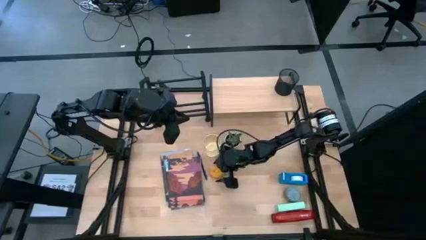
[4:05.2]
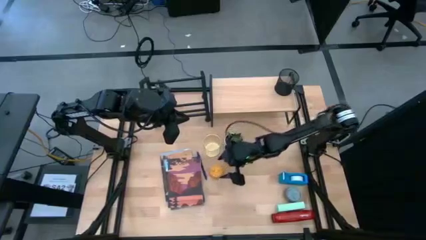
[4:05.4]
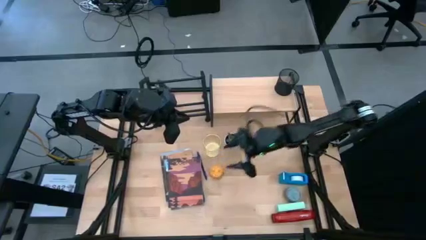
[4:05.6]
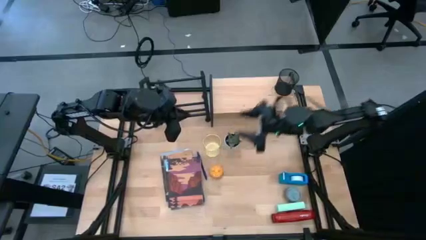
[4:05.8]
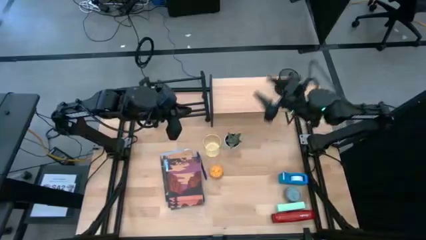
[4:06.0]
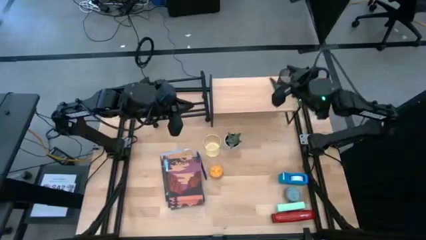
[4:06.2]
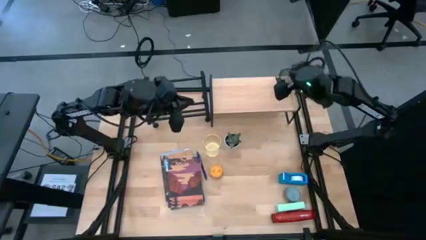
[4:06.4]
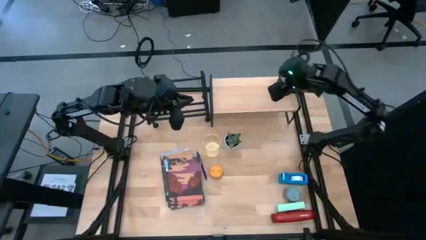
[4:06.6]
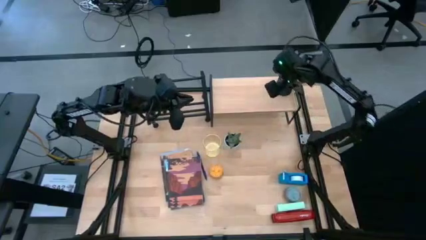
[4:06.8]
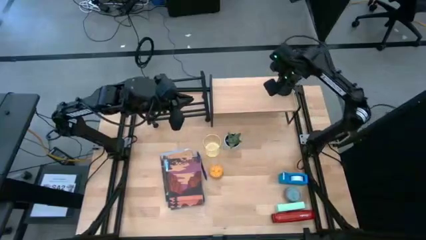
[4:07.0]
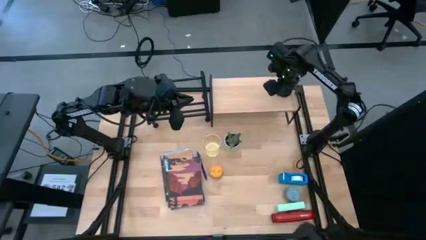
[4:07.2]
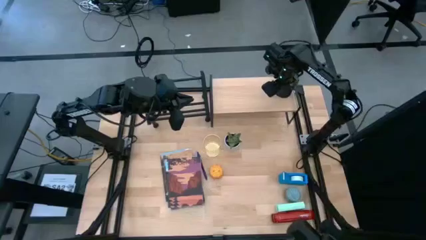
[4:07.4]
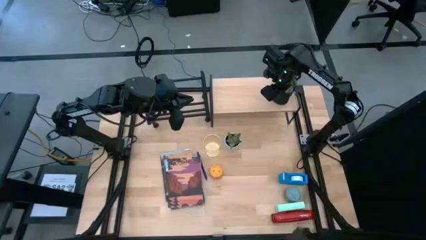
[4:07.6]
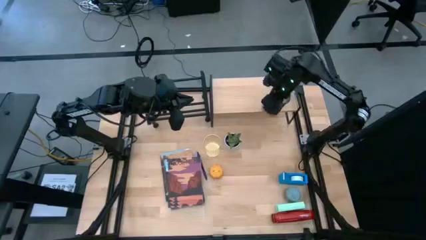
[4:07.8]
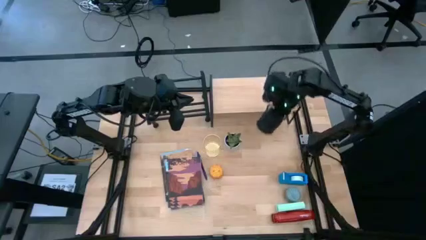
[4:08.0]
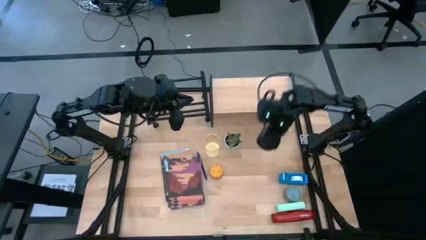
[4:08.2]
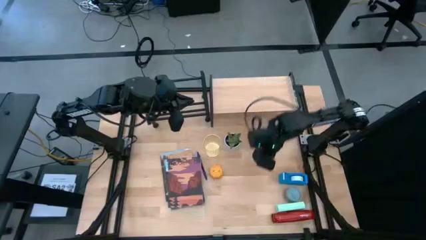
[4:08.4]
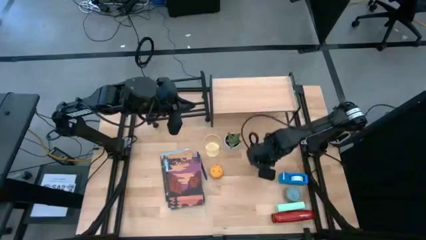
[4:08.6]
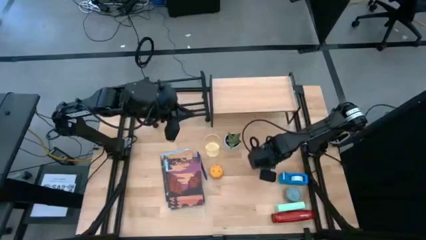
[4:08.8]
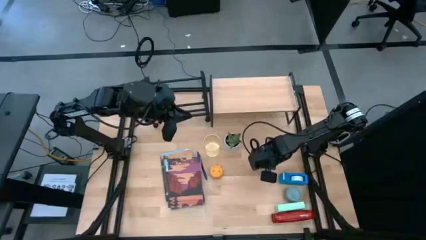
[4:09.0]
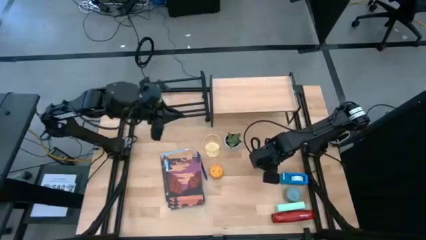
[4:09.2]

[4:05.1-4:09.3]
Task: Stock shelves
Remove the black pen organizer from the shelf

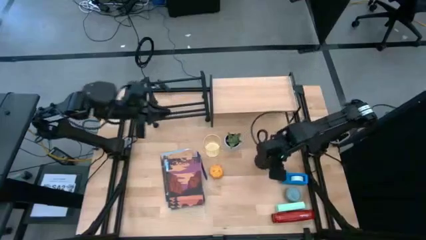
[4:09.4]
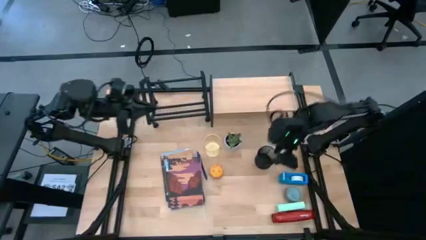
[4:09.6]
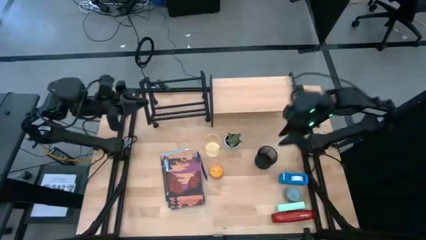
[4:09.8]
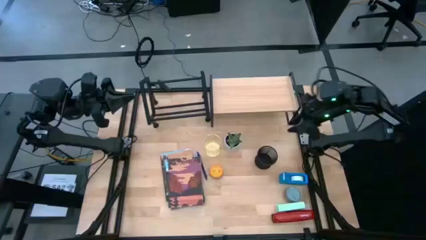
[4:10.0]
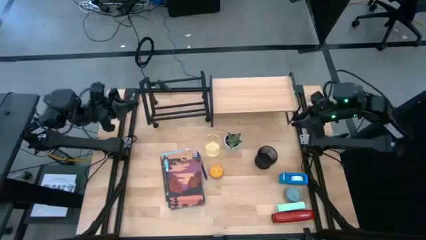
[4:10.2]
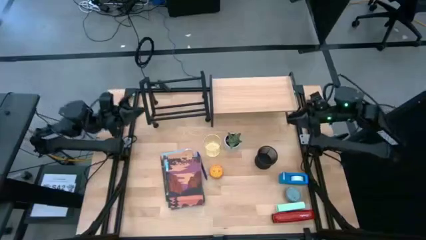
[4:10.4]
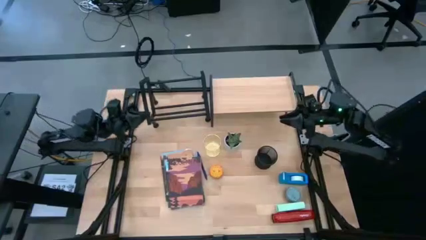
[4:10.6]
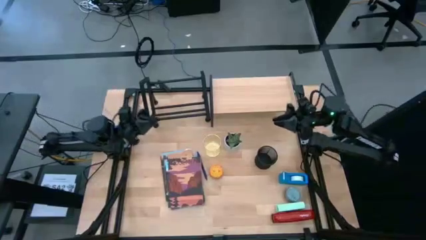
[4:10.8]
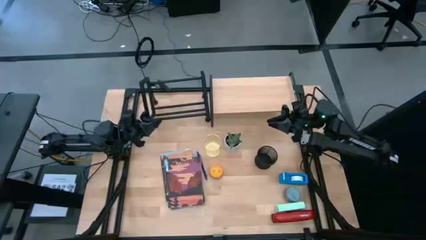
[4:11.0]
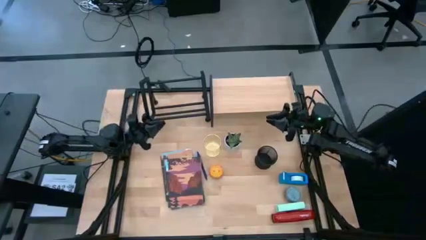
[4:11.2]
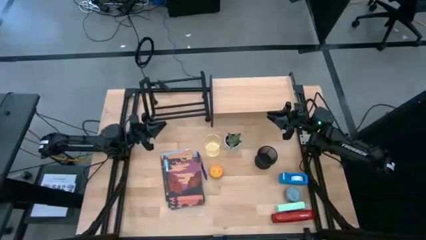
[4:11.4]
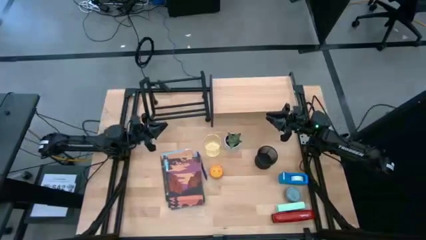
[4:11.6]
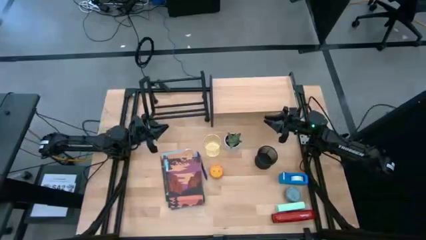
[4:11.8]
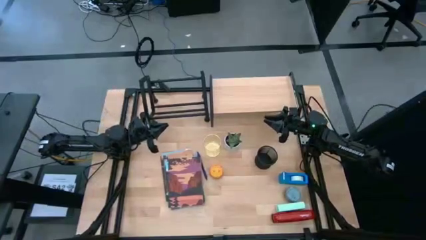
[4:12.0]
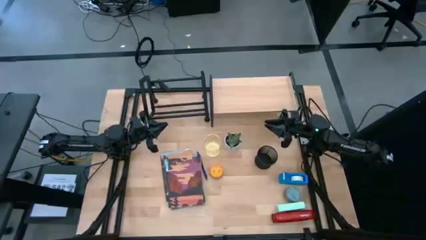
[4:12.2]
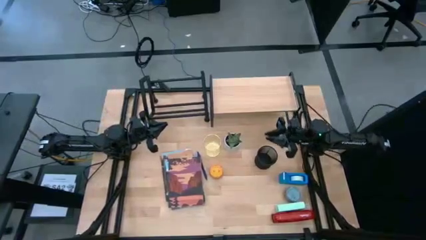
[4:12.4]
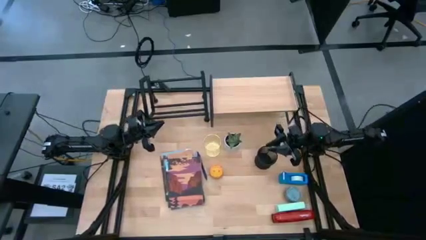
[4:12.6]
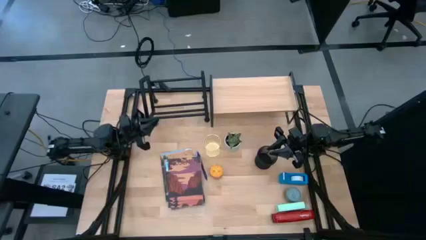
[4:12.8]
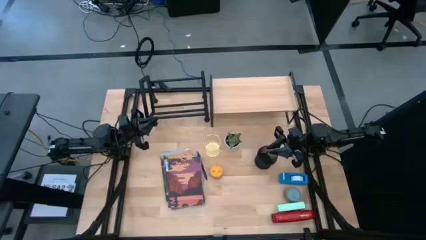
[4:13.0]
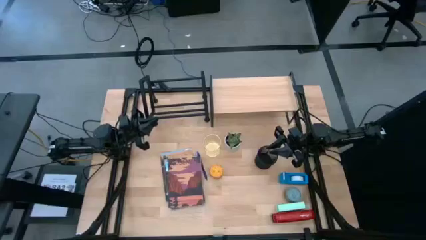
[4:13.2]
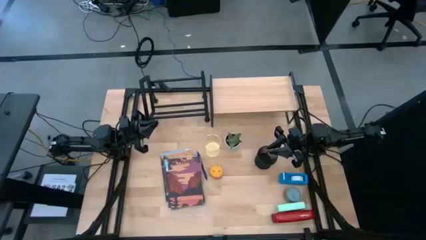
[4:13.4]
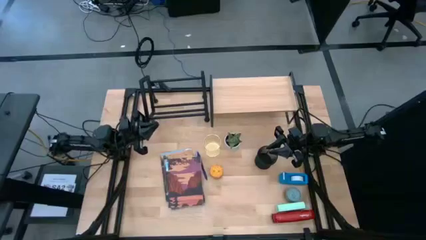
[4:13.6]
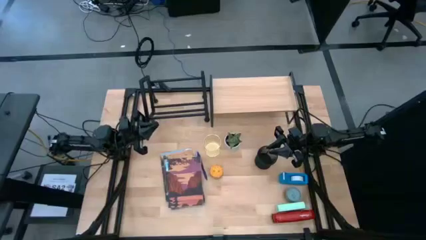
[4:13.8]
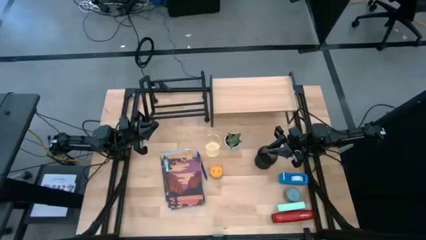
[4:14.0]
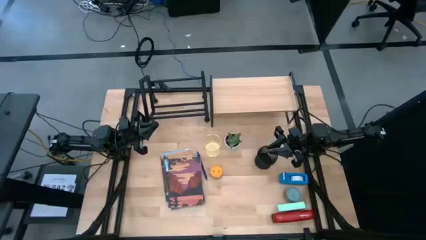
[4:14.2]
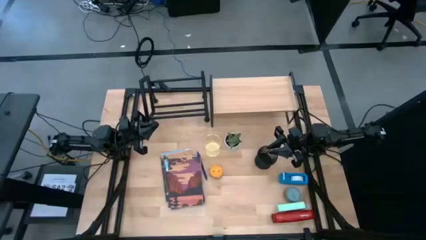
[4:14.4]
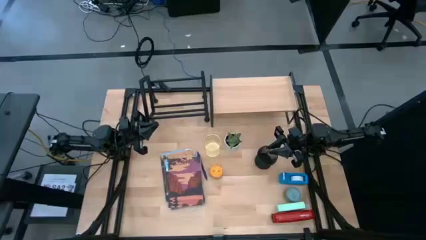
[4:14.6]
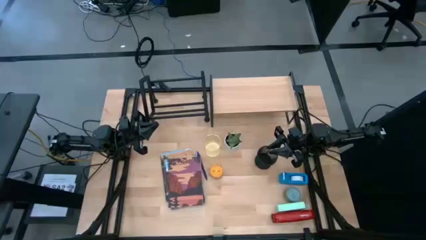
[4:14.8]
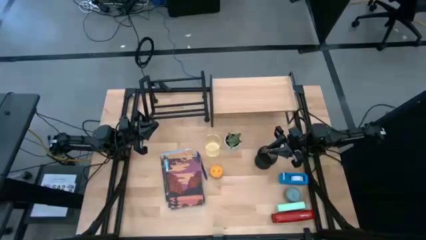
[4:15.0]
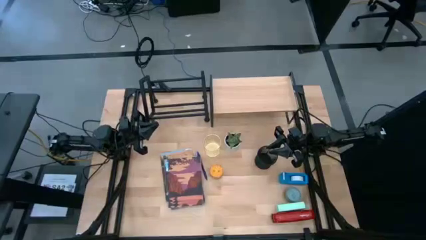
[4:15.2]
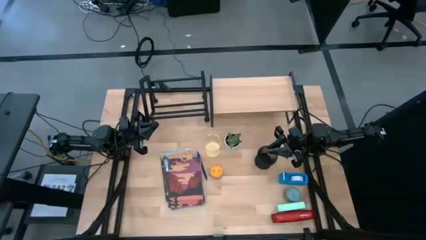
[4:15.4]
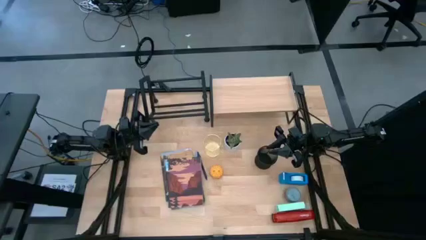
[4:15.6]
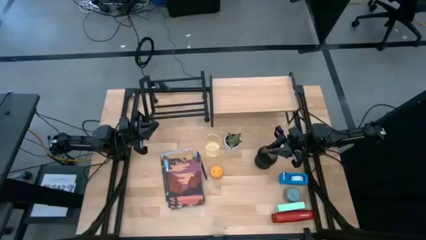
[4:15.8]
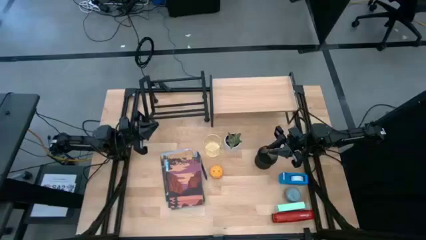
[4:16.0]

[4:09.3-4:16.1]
Return to Home Position

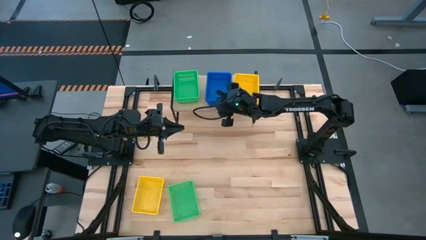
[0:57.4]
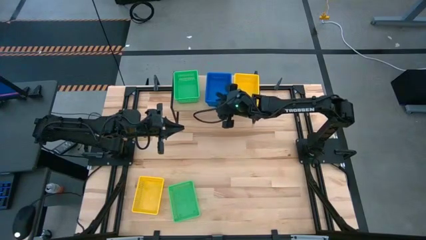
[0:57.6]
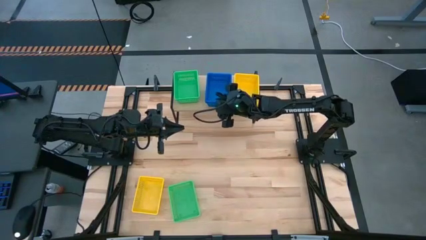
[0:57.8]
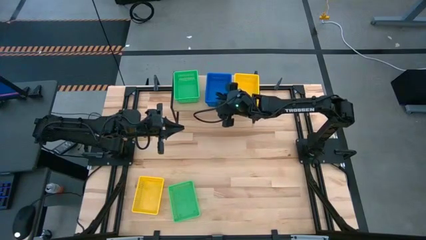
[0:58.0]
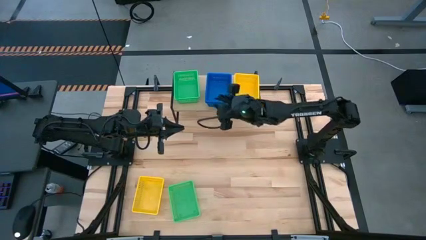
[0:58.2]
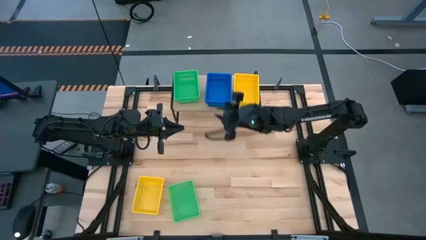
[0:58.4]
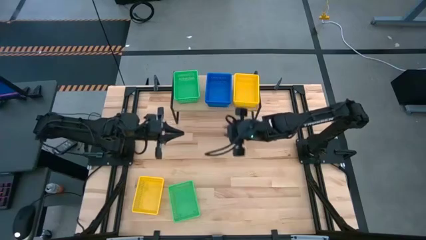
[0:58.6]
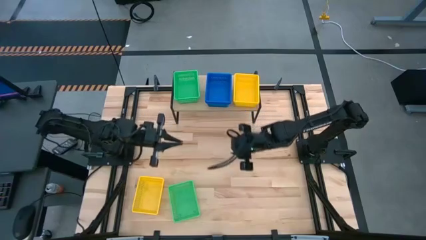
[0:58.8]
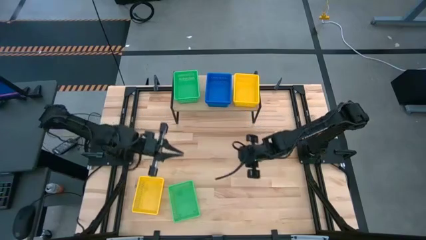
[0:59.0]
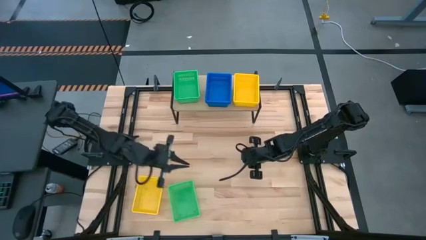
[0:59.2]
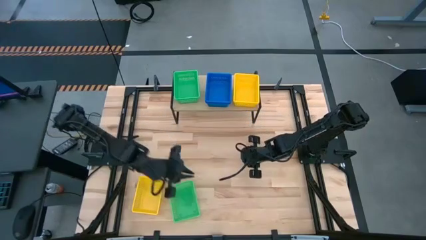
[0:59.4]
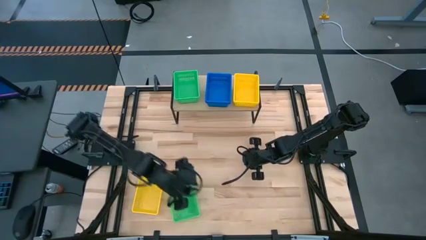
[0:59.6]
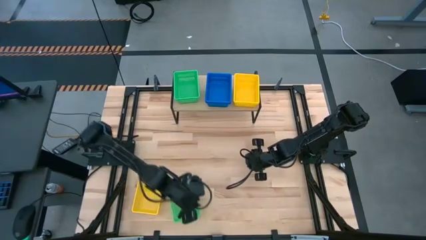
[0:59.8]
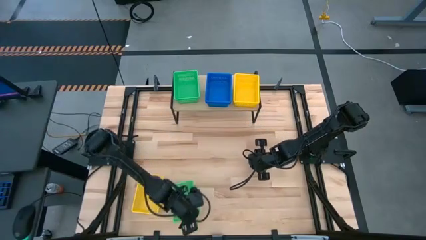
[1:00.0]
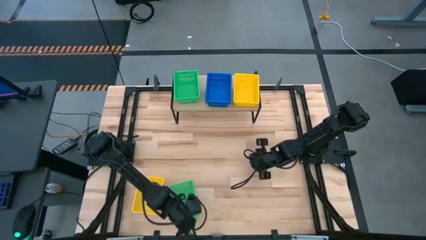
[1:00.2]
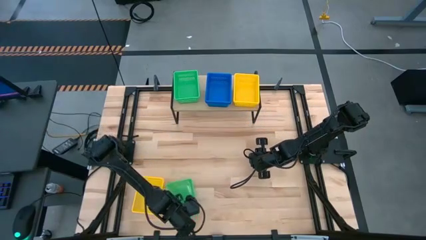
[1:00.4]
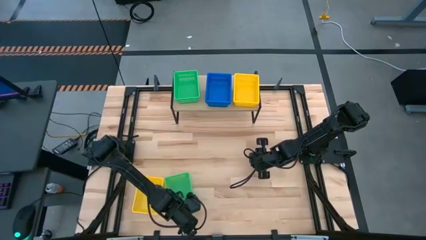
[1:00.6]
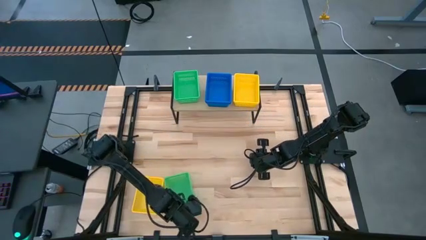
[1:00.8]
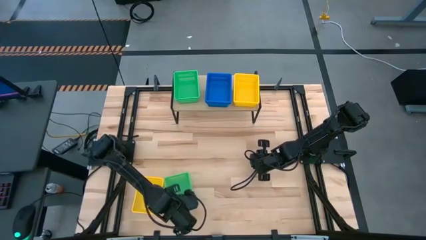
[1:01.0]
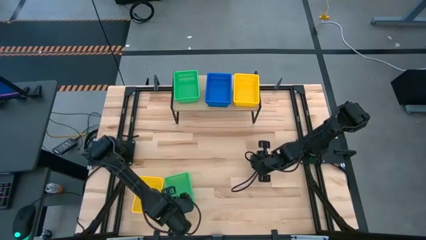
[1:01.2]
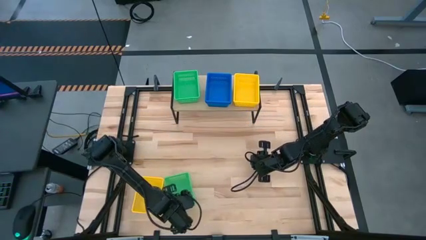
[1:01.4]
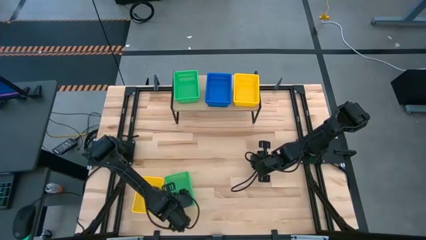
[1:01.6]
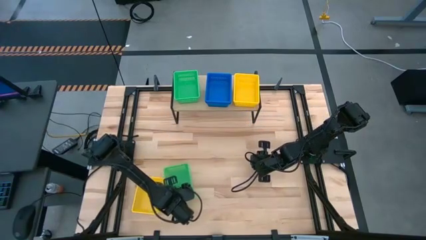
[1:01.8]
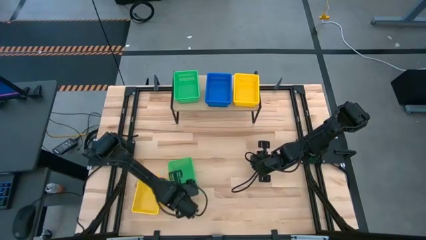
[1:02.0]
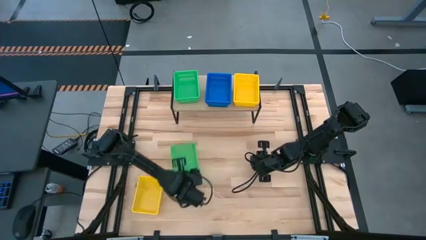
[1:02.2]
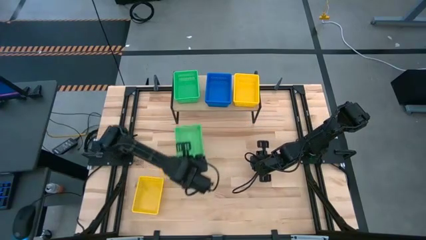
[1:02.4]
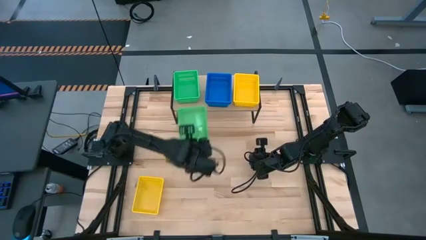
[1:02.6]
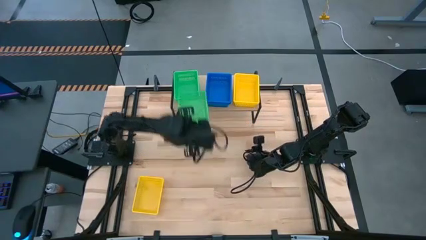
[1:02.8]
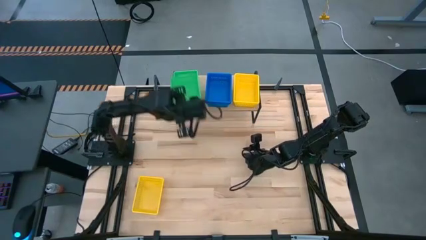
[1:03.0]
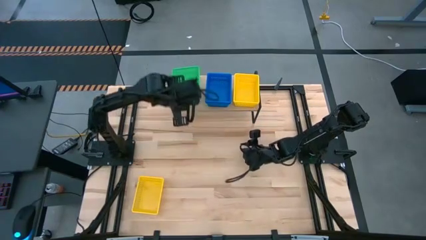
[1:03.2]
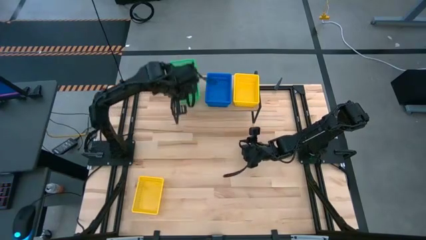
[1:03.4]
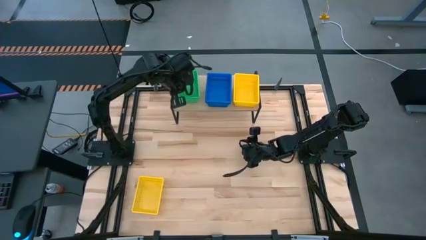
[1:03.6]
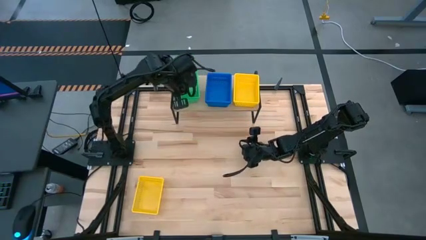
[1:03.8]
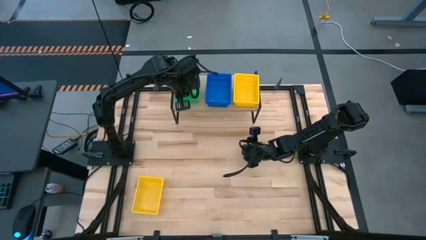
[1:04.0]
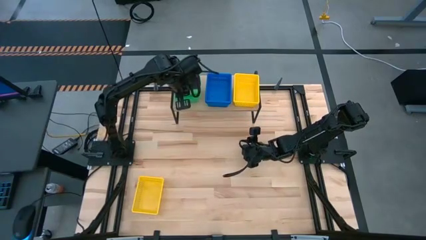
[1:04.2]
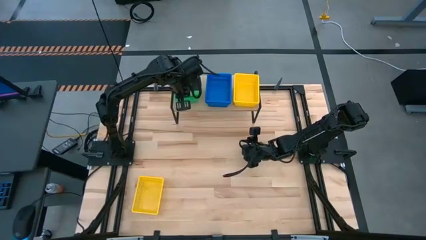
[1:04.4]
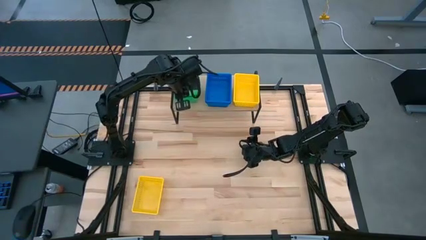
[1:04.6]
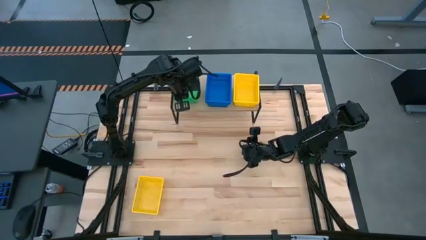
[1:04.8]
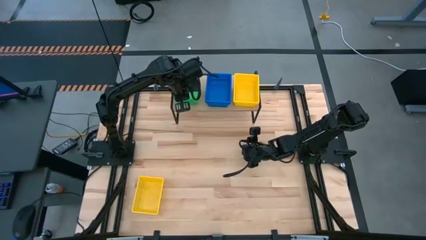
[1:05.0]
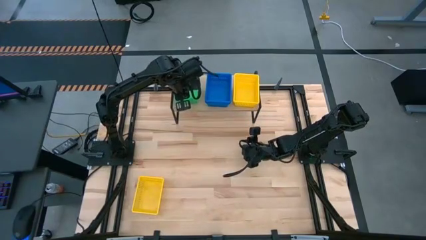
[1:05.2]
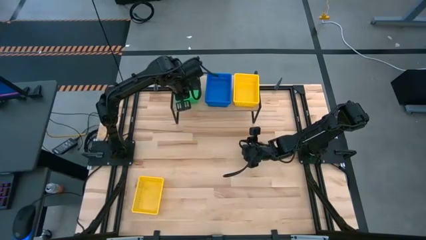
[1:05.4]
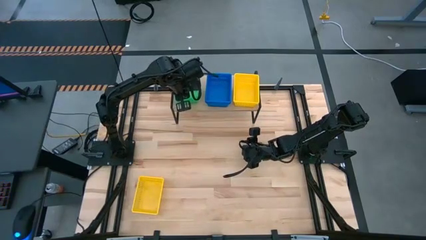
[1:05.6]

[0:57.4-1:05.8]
Task: Stack baskets on shelf by color
Stack the green bin on top of the green bin on the shelf
